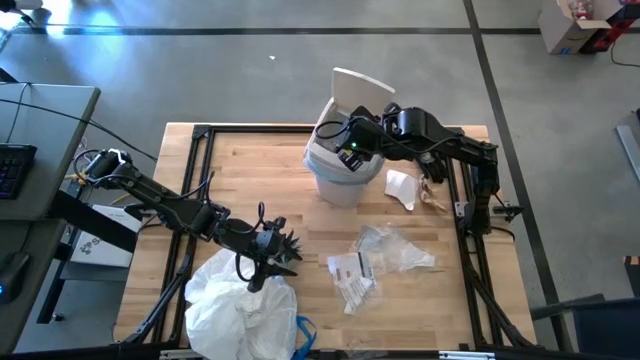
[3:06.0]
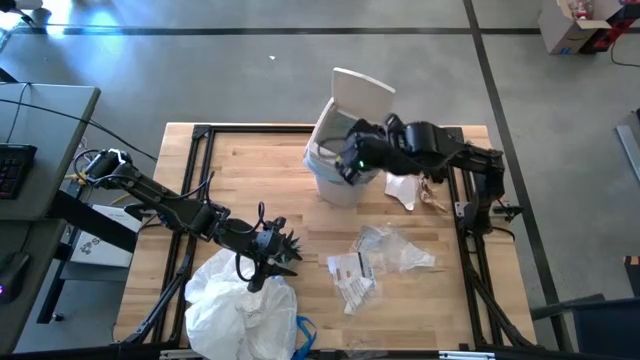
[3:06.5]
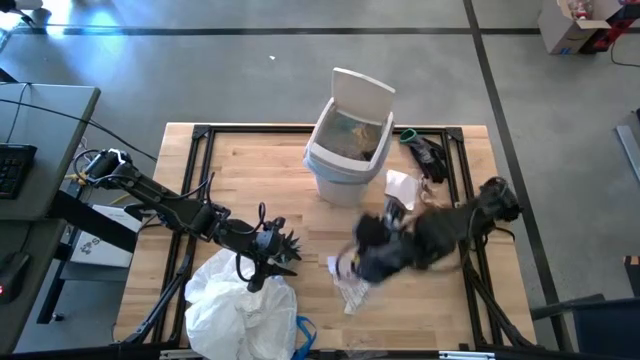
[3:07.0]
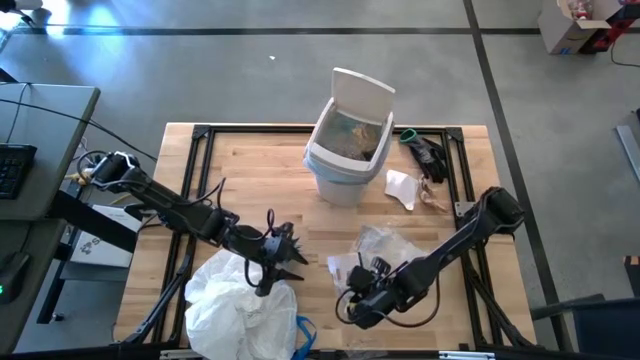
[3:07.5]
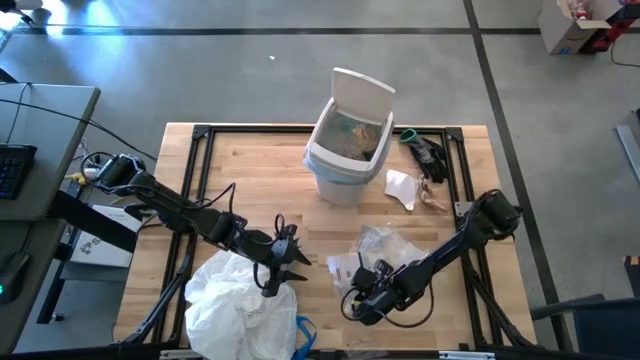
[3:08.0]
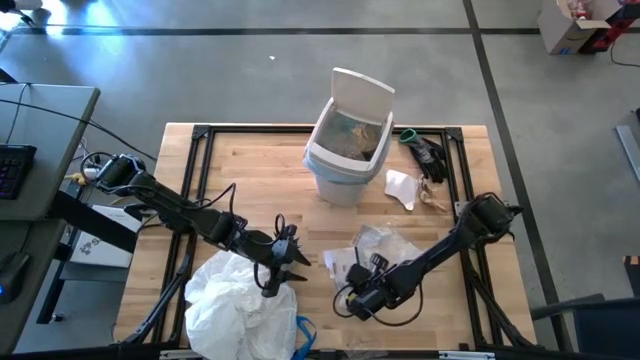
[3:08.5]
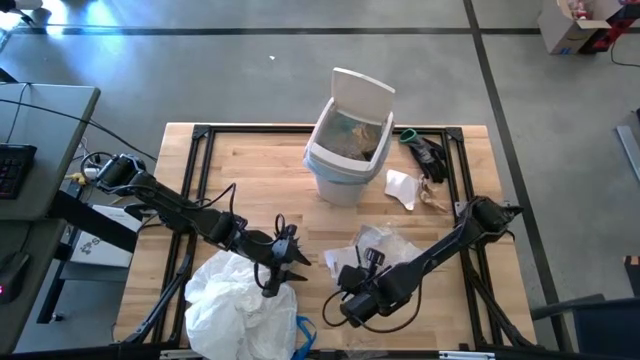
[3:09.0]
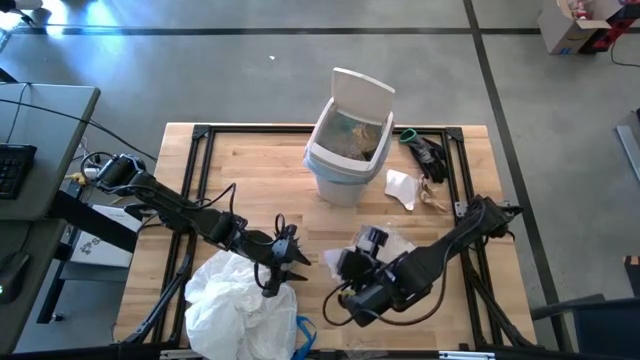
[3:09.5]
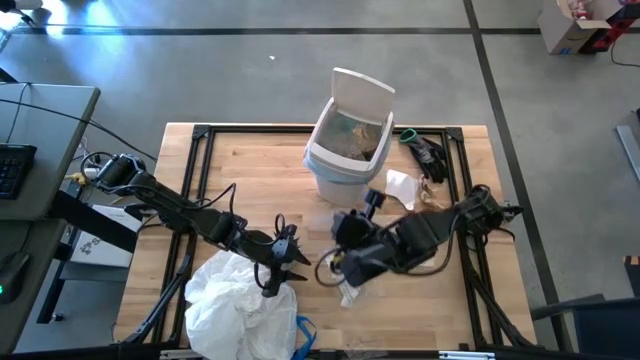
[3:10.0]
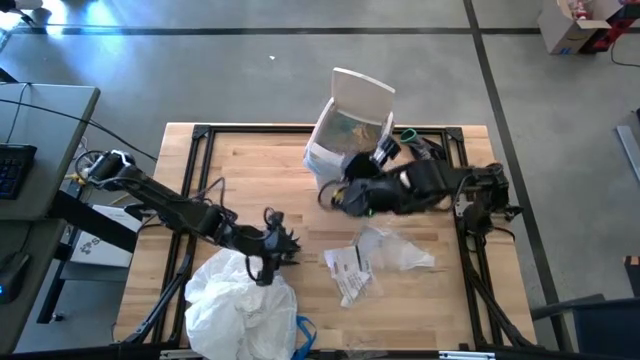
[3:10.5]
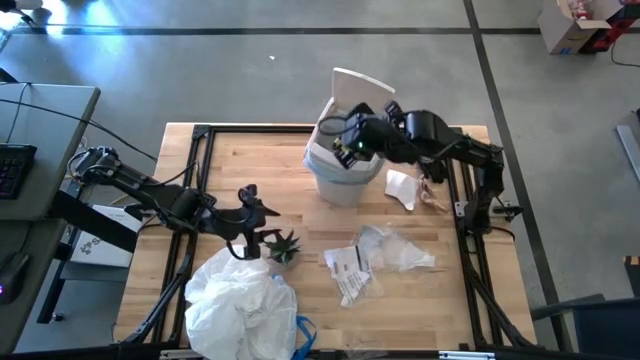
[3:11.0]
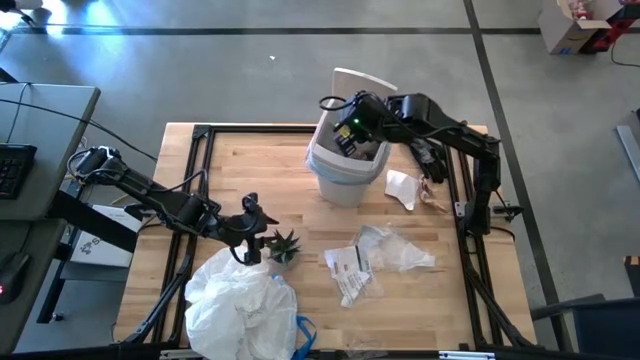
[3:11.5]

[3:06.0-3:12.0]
Task: place trash/remove bag and relplace
Put the transparent plastic into the trash bin

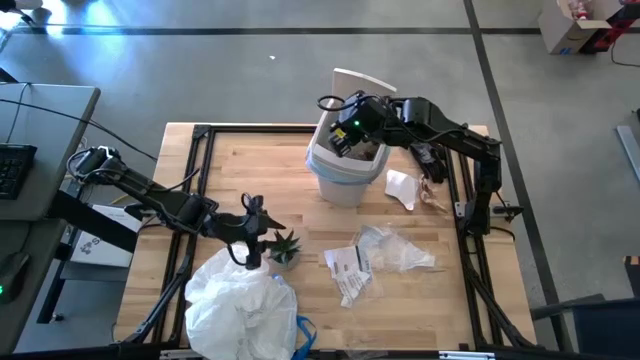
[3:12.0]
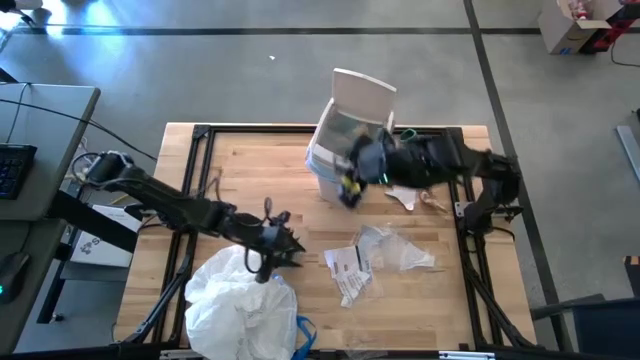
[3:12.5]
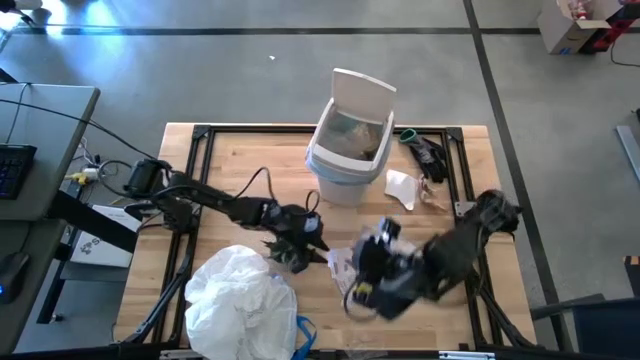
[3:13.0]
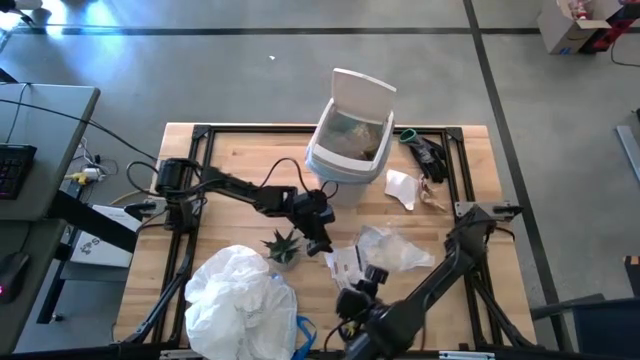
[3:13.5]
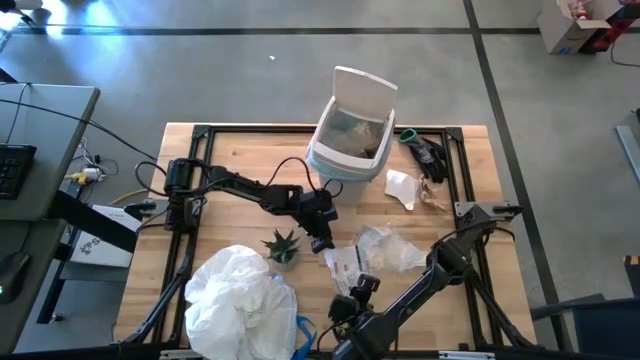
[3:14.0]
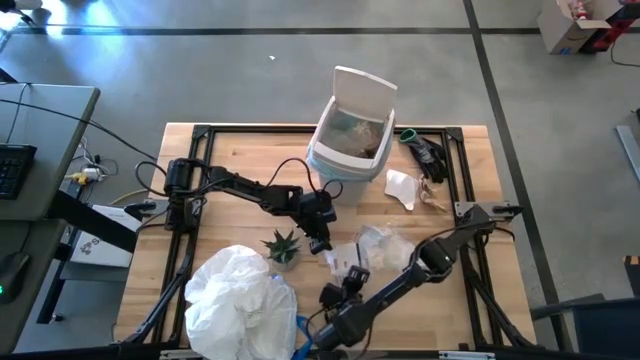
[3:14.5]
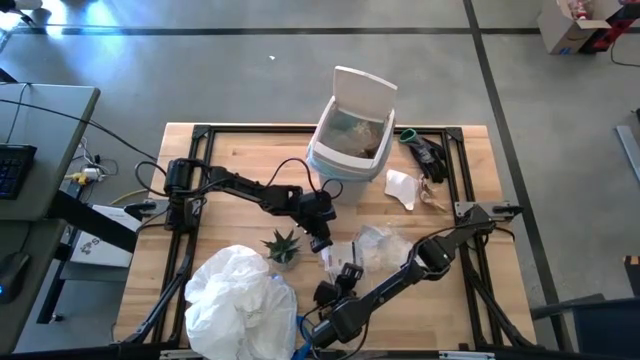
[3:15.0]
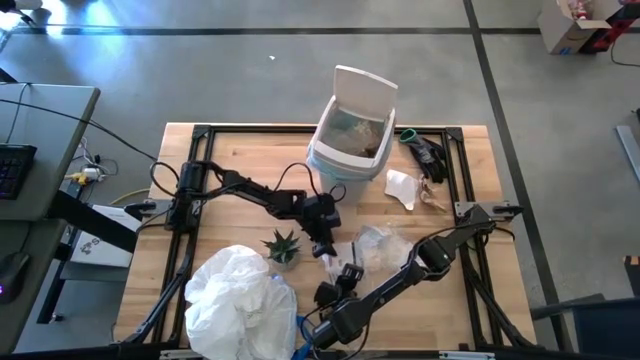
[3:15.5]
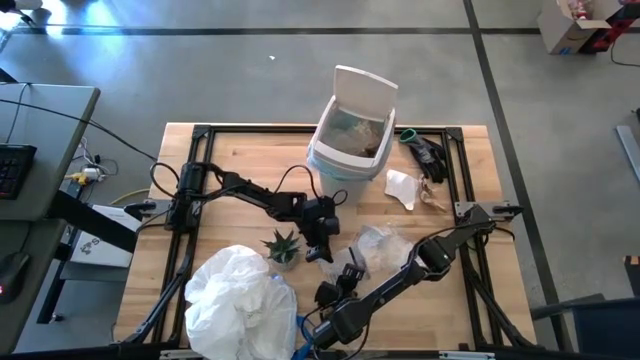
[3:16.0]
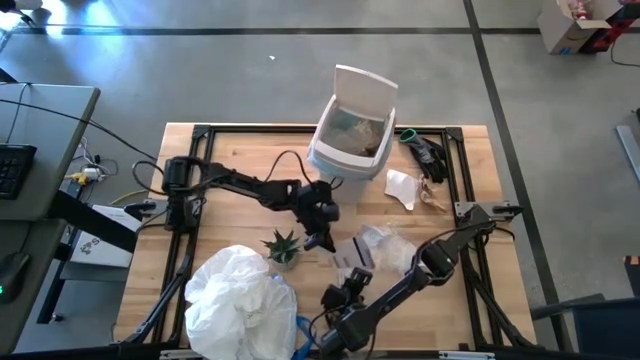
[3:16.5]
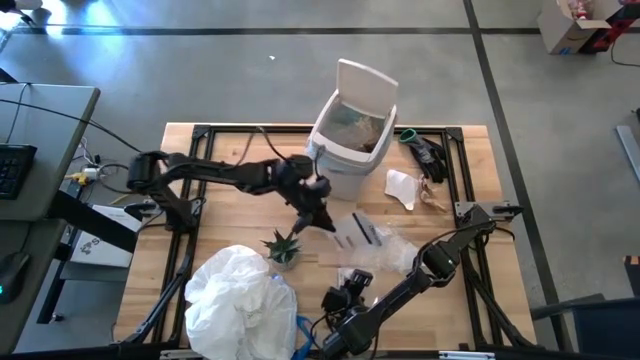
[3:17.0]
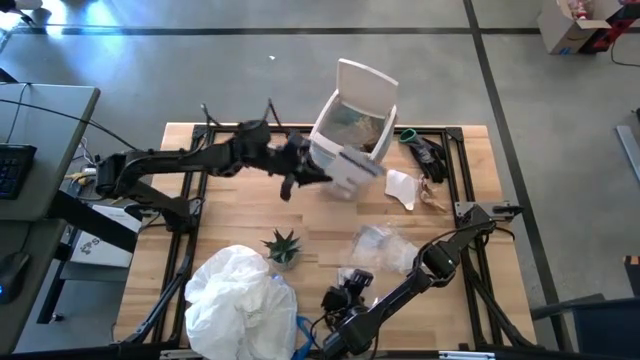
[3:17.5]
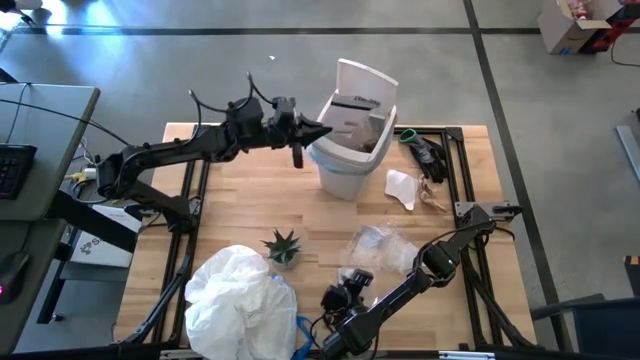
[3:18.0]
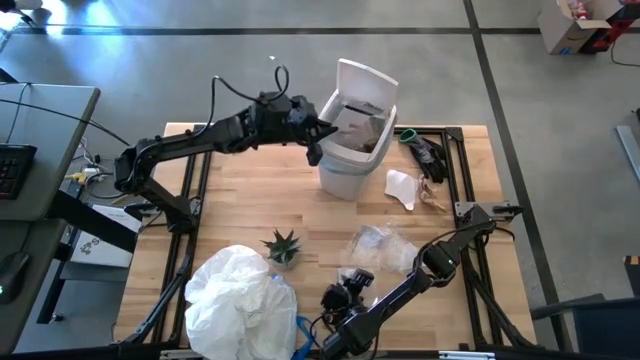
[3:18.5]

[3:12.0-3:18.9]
Put the white paper into the trash bin

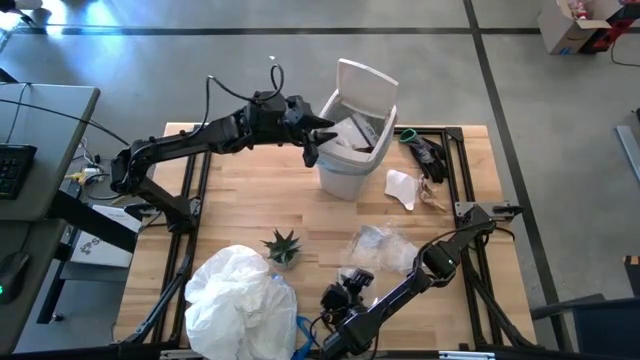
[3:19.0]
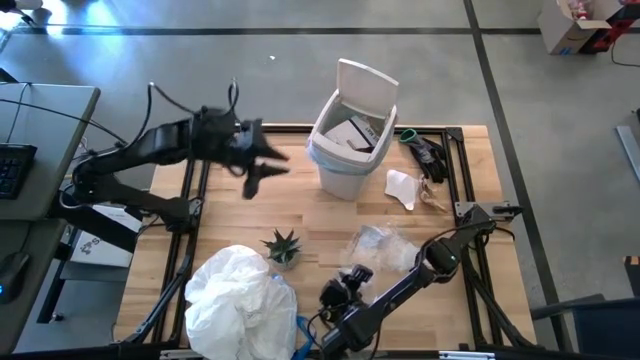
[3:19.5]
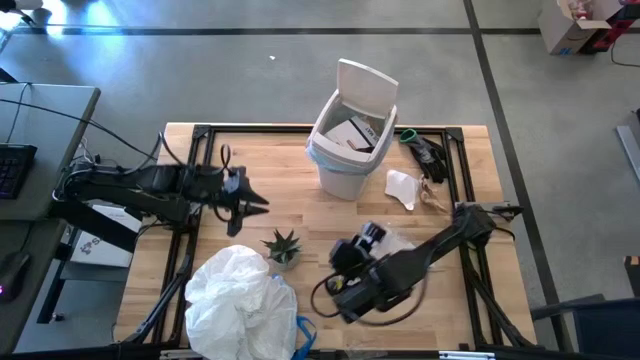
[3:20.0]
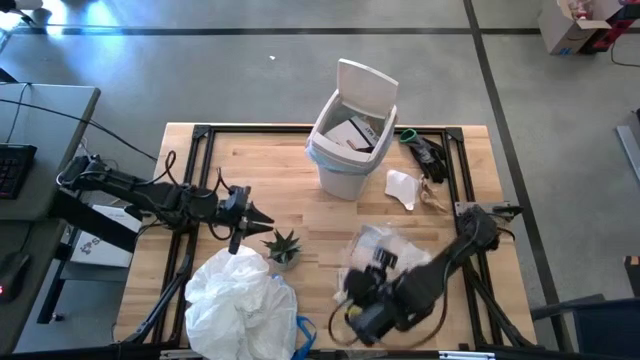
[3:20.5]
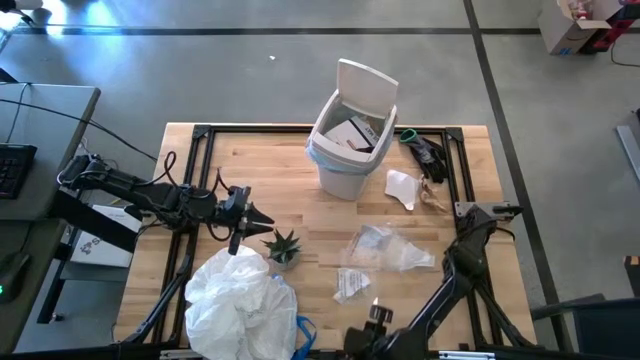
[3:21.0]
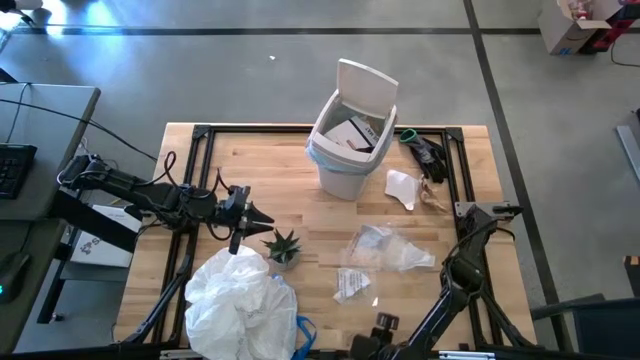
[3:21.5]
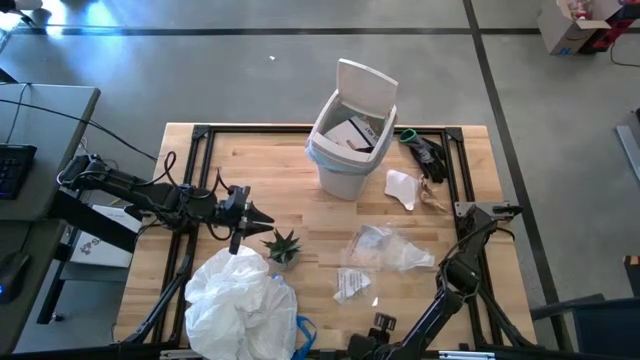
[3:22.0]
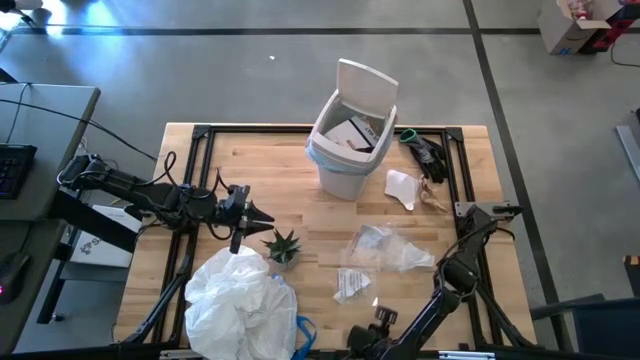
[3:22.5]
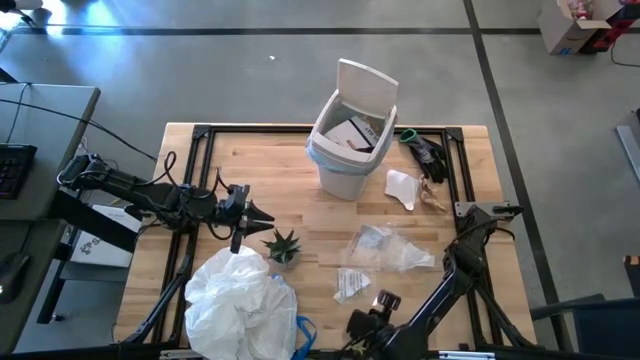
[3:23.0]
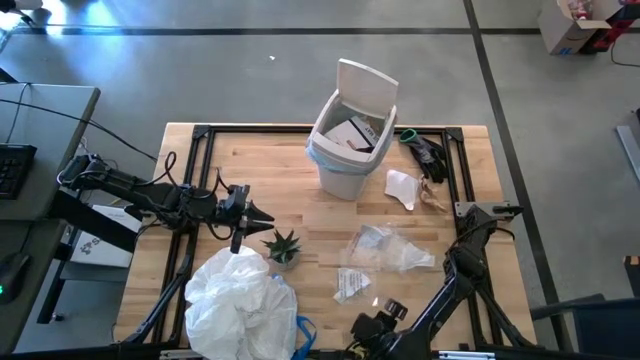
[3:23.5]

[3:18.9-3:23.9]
Put the transparent plastic into the trash bin

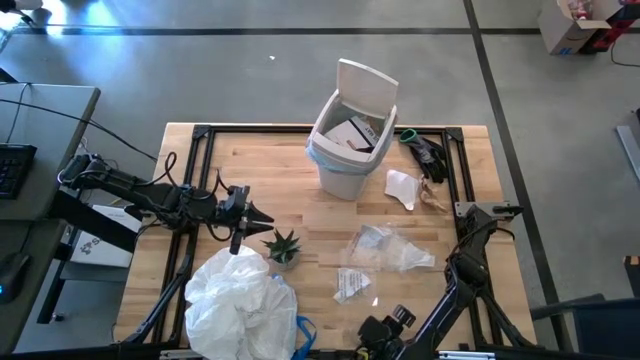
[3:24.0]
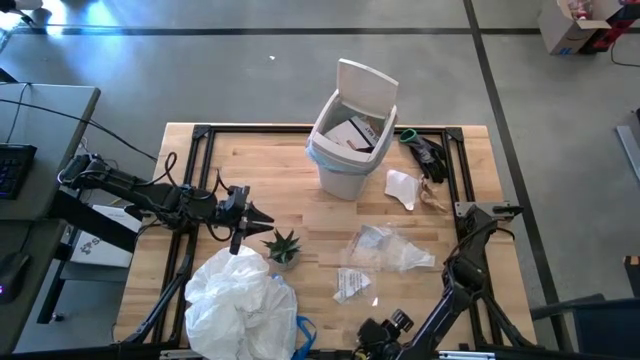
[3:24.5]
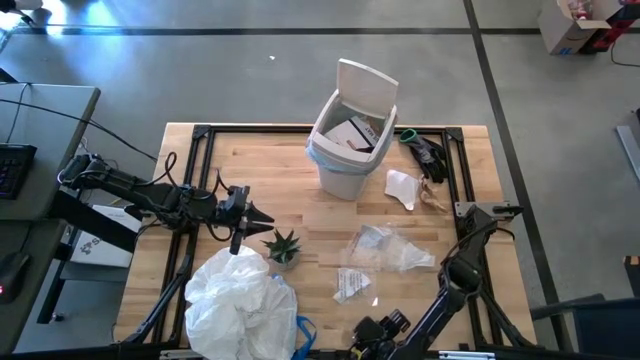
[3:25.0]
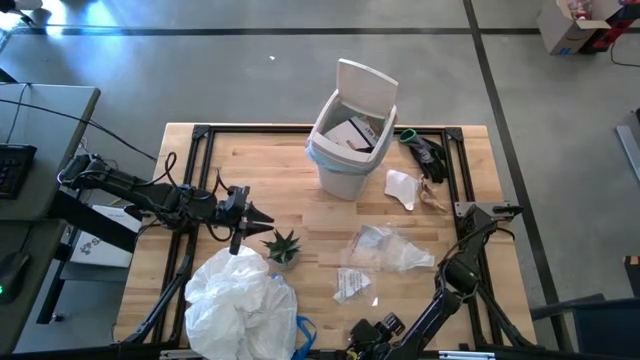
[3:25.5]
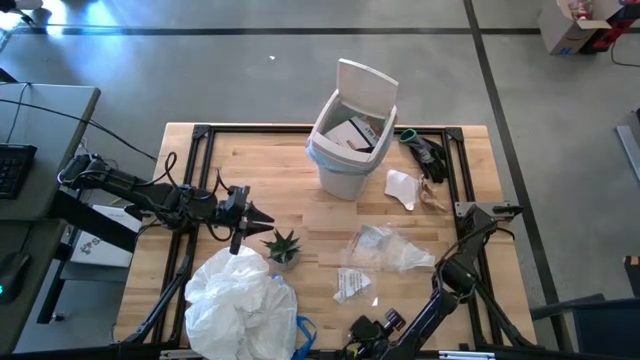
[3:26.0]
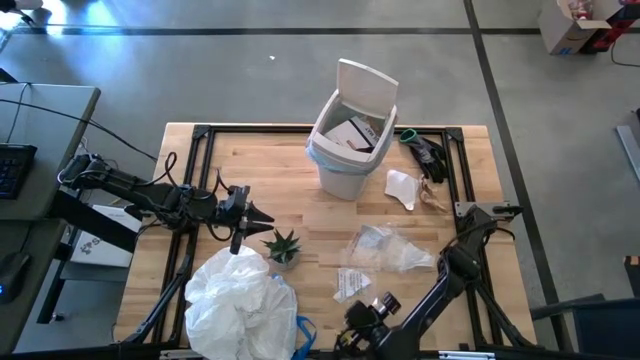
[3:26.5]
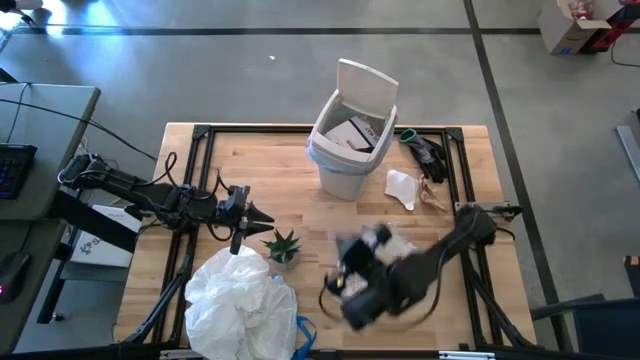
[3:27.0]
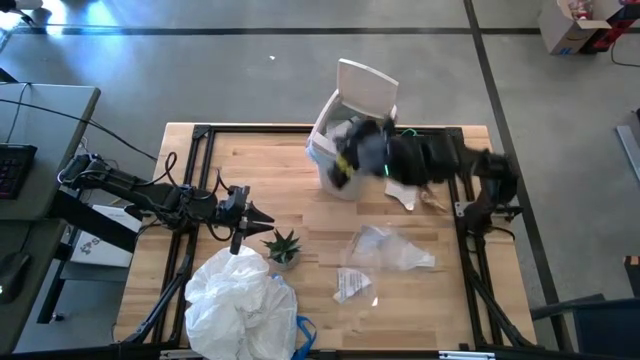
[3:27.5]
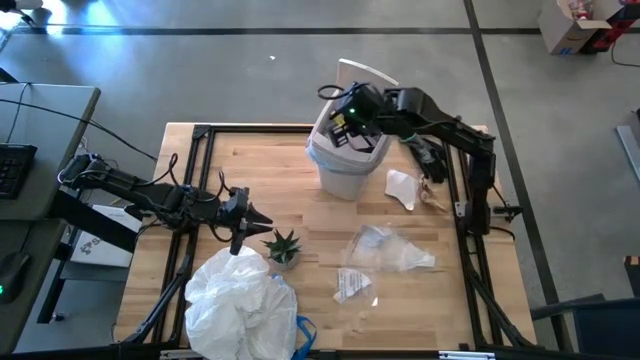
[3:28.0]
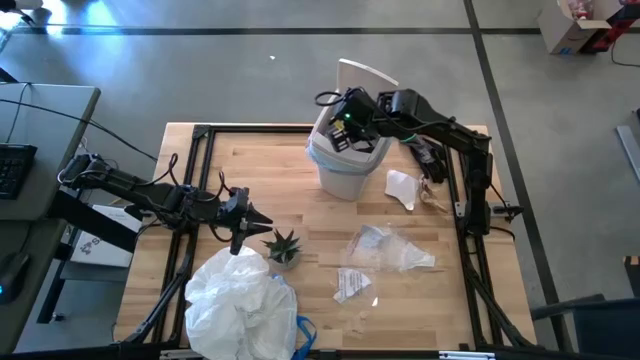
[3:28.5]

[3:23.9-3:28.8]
Put the transparent plastic into the trash bin
